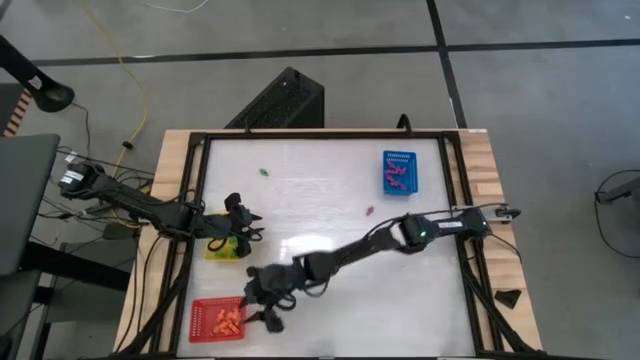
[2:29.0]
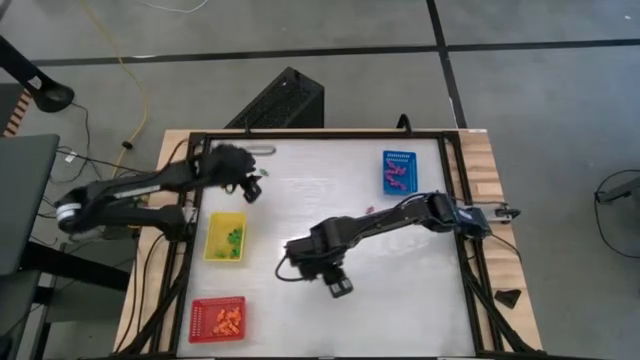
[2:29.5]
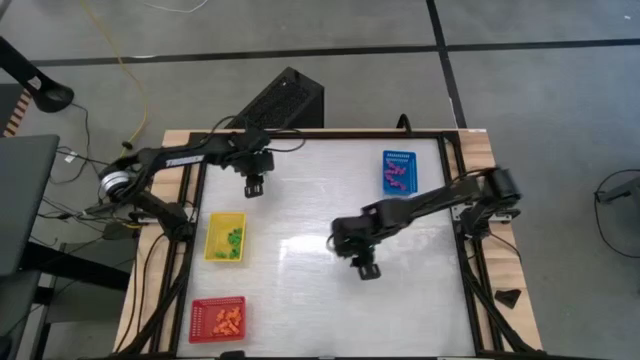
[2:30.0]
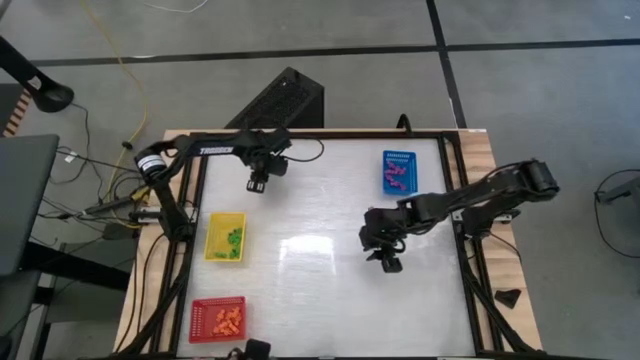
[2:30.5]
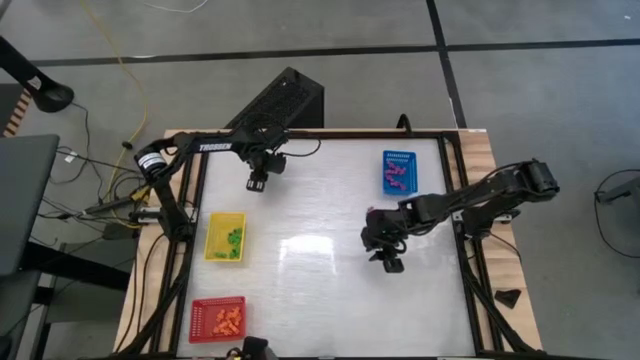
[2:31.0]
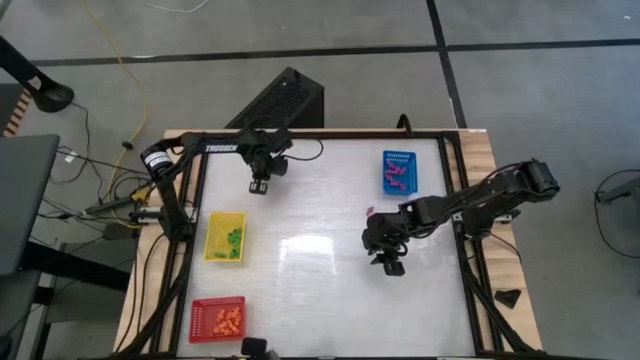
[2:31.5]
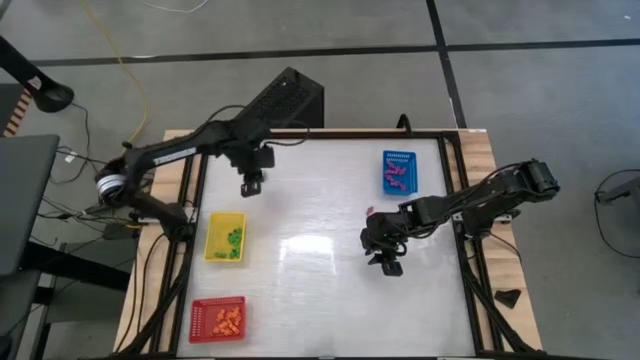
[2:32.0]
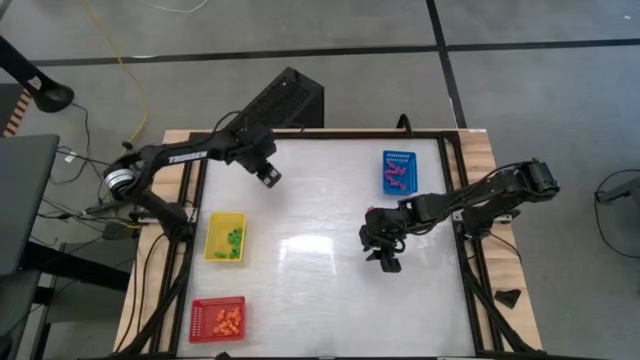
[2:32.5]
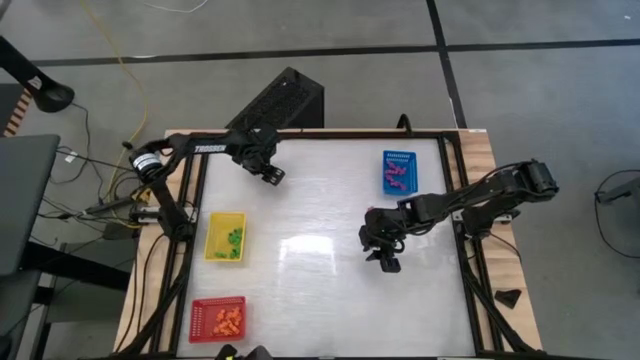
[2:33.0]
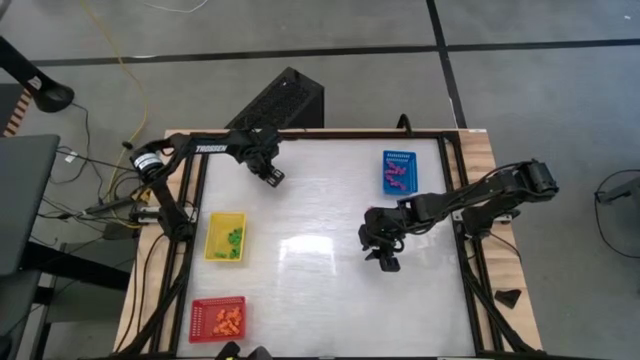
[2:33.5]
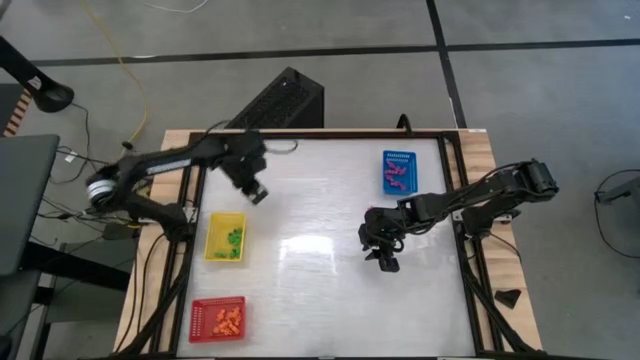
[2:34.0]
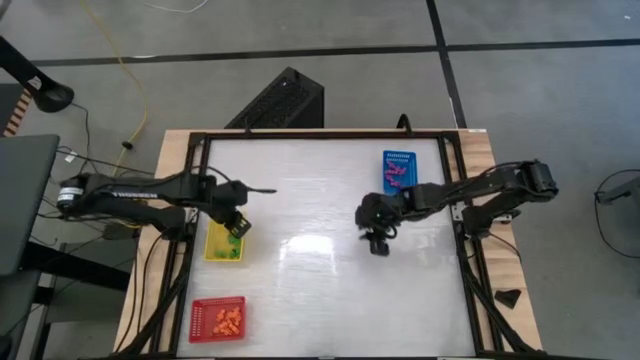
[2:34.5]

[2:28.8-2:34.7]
Task: Sort Halloween decoration
Put the green skeleton toy into the yellow bin

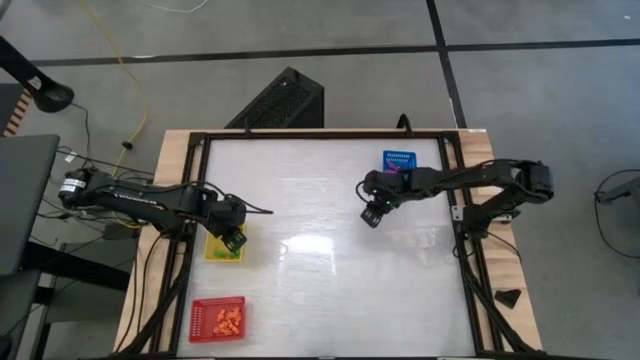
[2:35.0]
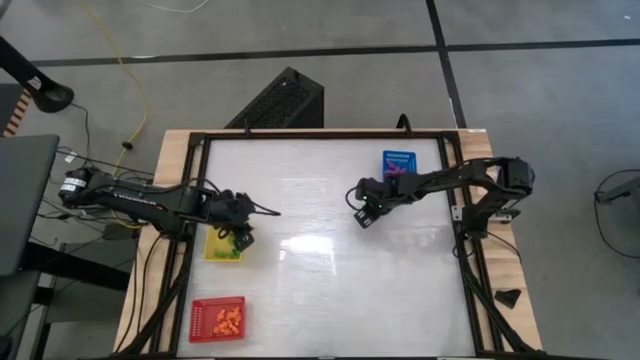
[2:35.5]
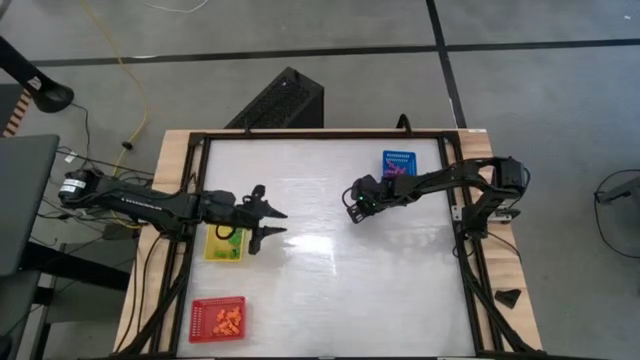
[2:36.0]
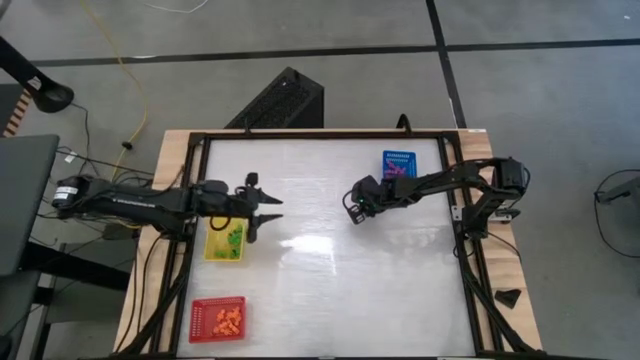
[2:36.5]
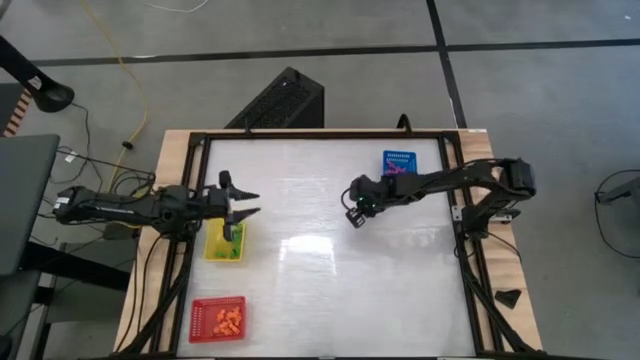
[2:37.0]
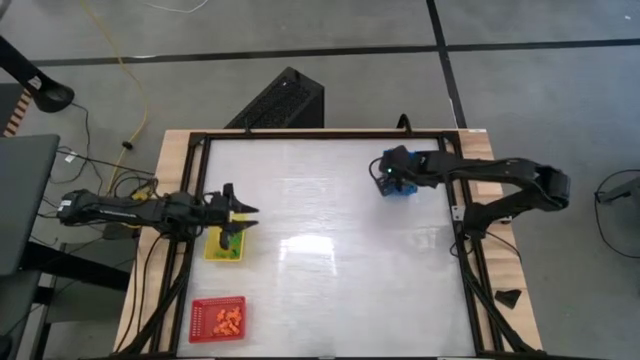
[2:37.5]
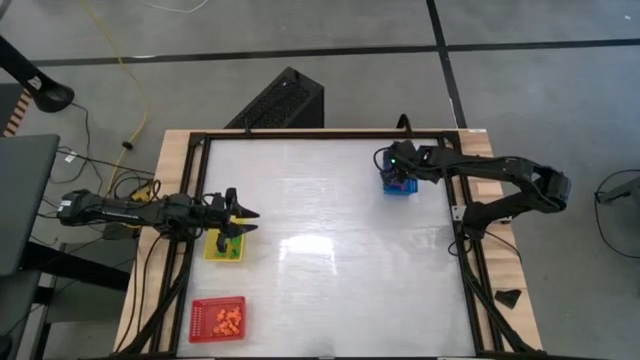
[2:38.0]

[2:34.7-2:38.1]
Put the purple skeleton toy into the blue bin

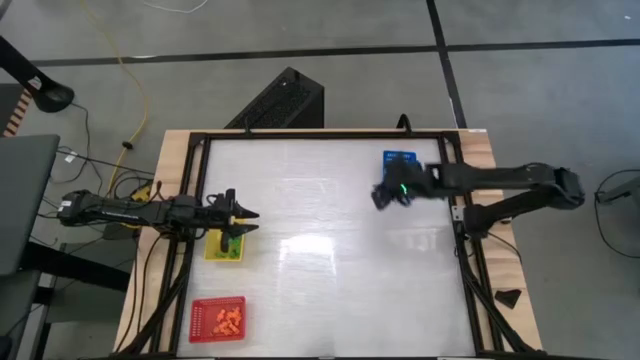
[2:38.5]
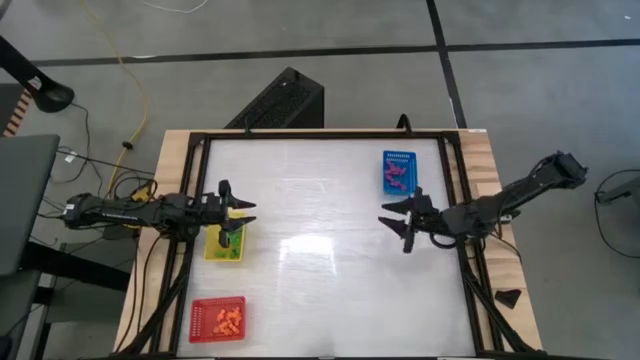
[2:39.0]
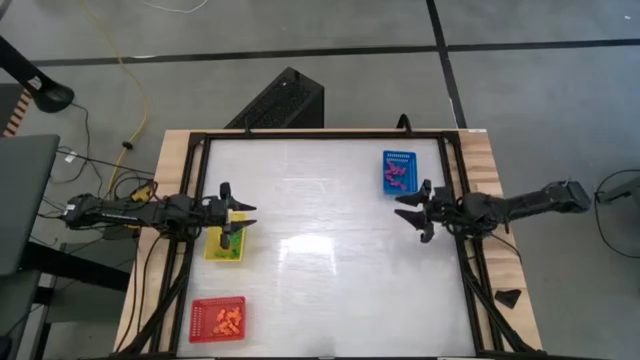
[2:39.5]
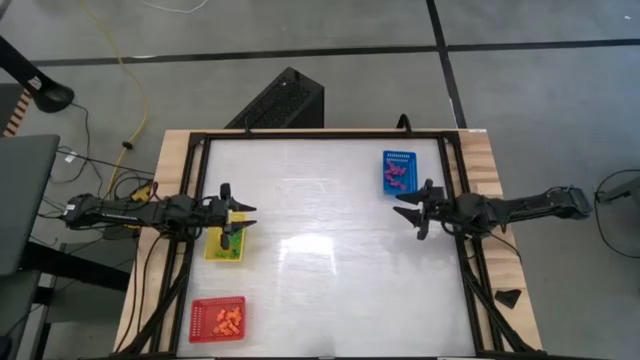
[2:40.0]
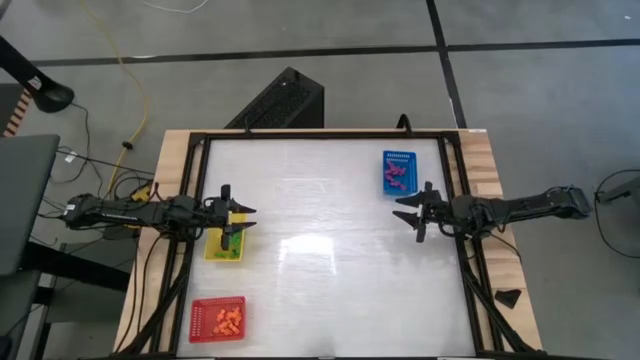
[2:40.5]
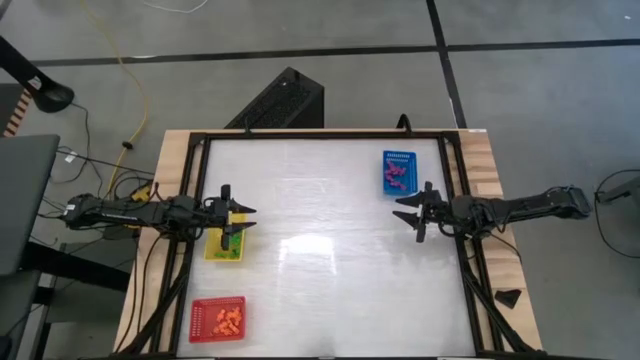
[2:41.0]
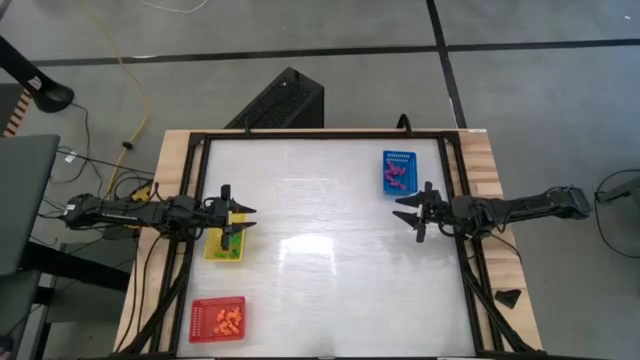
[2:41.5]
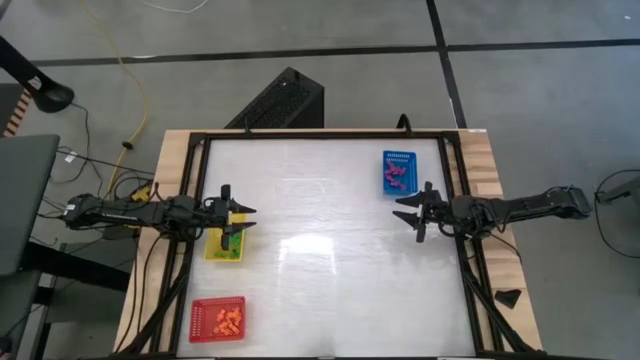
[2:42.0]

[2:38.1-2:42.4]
Return to Home Position

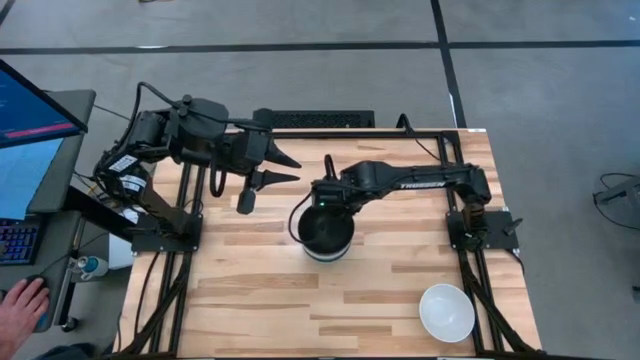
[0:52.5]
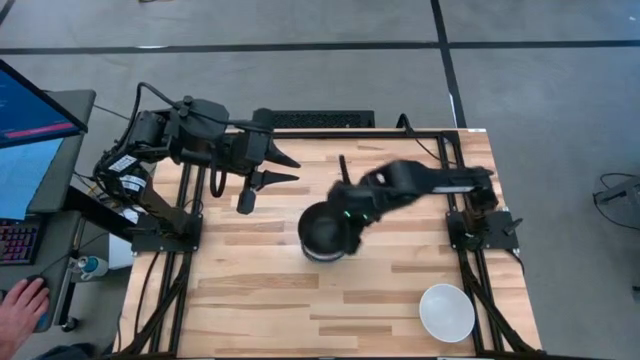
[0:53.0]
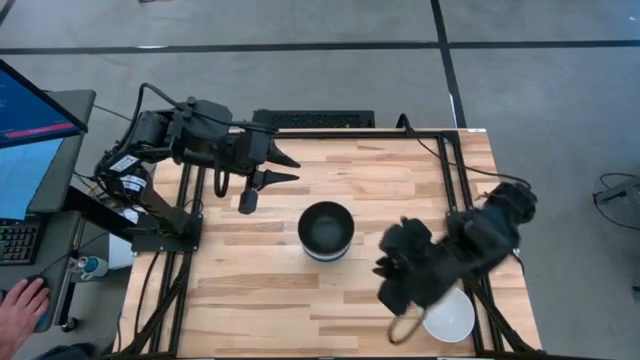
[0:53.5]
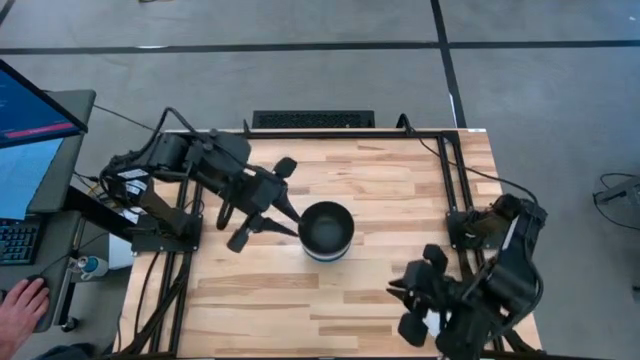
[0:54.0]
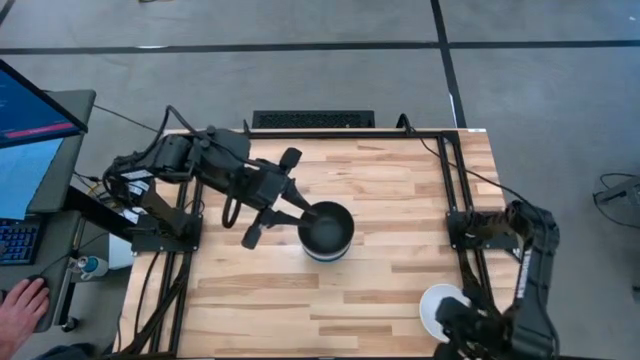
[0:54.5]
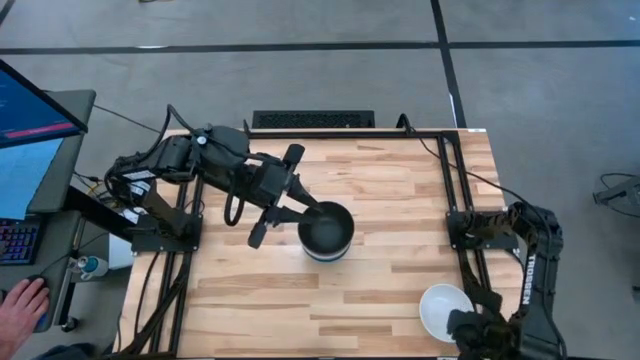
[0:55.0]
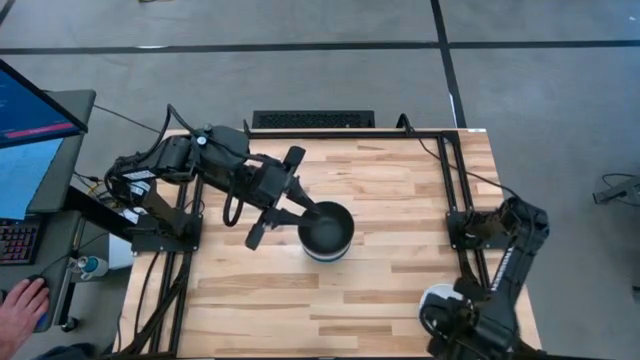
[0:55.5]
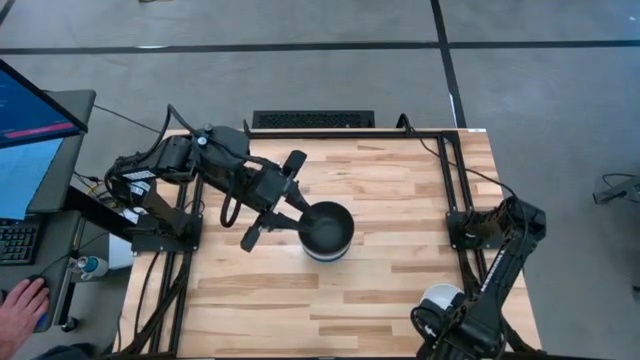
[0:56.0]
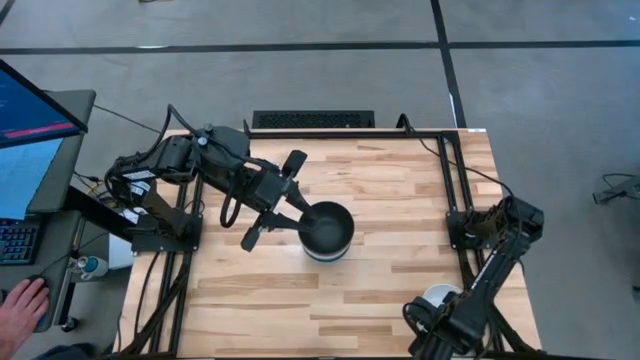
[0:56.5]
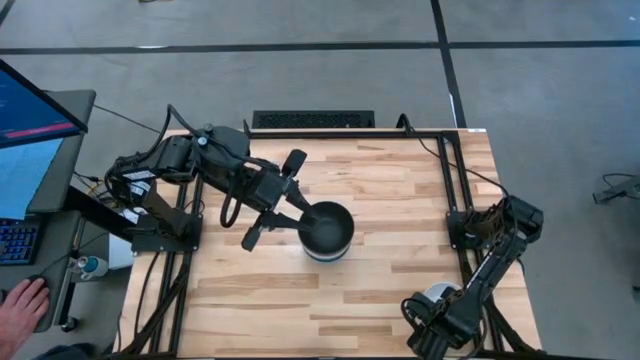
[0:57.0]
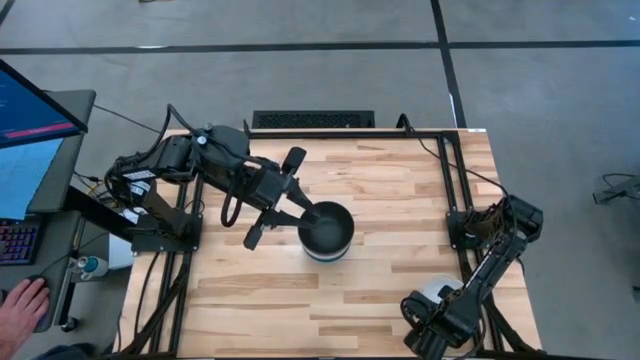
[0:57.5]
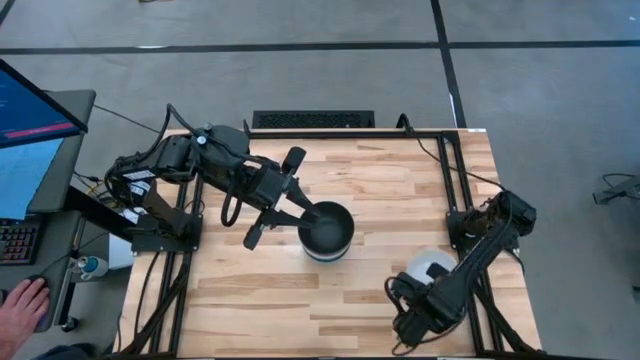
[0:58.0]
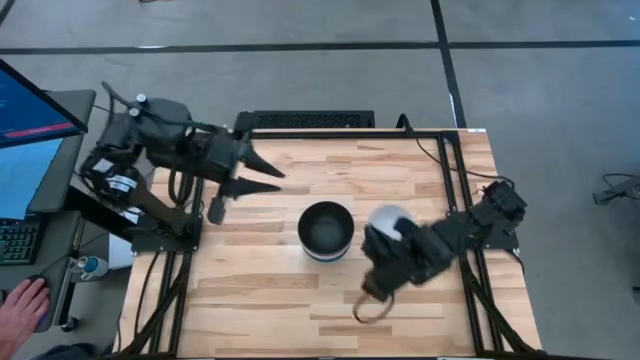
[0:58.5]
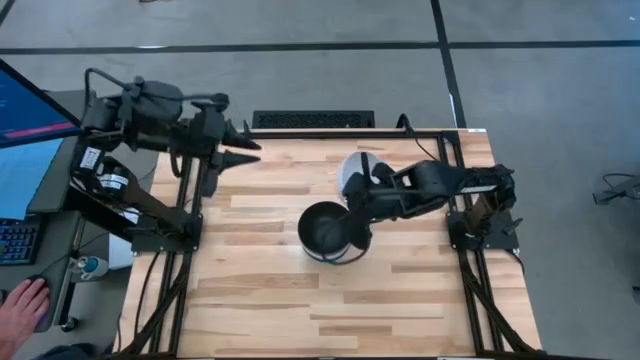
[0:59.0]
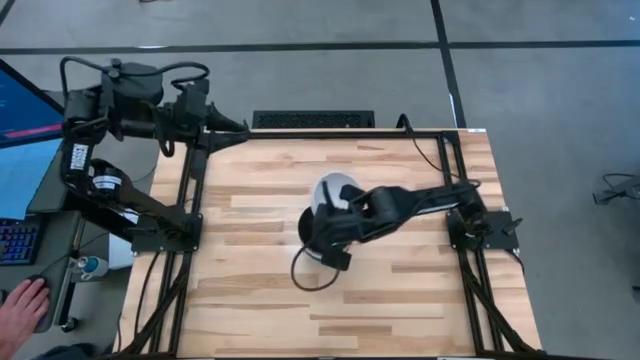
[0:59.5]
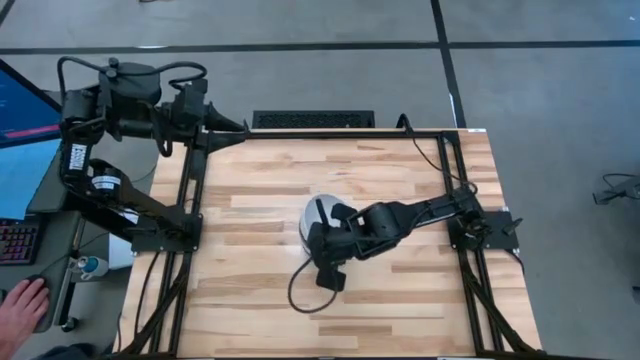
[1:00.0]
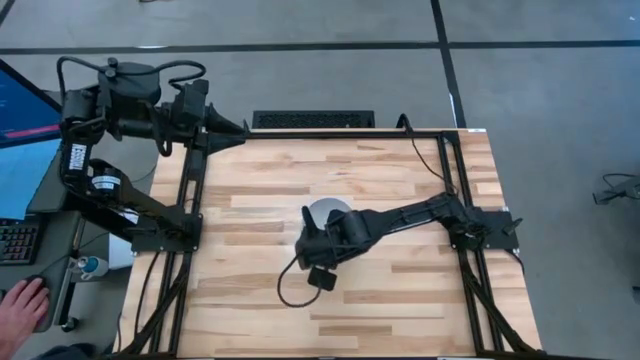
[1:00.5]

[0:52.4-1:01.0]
Task: Nest bowls inside each other
Stack the white bowl on top of the black bowl
